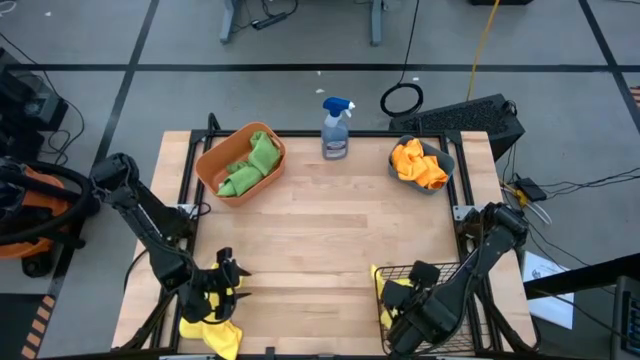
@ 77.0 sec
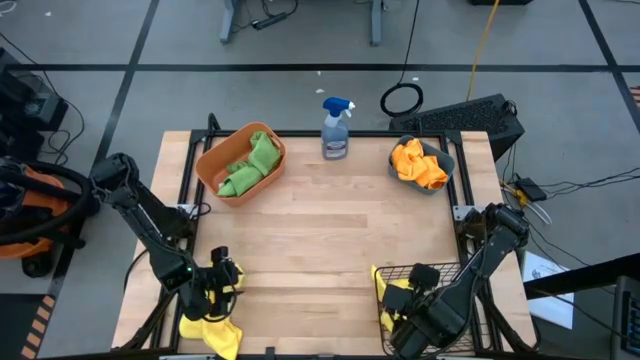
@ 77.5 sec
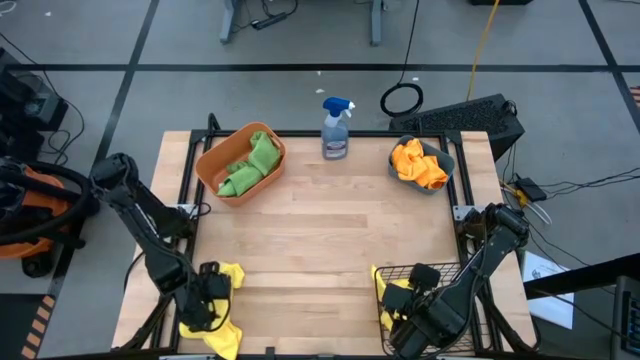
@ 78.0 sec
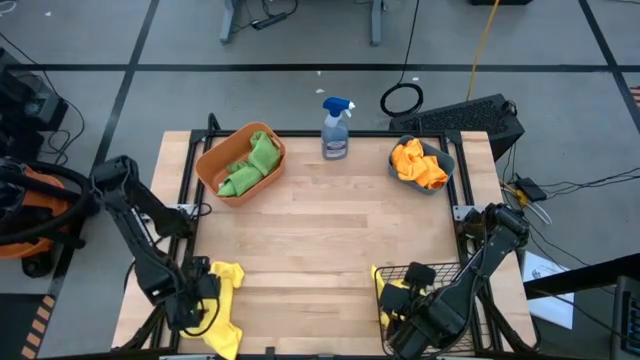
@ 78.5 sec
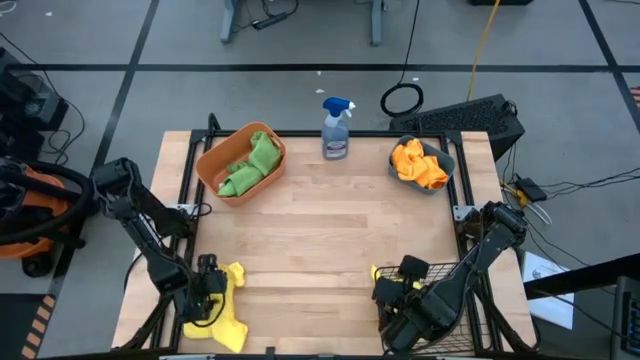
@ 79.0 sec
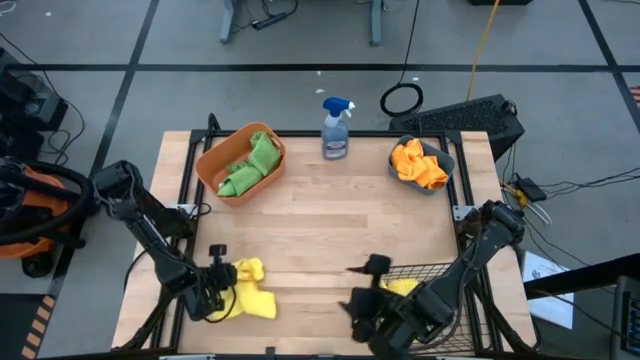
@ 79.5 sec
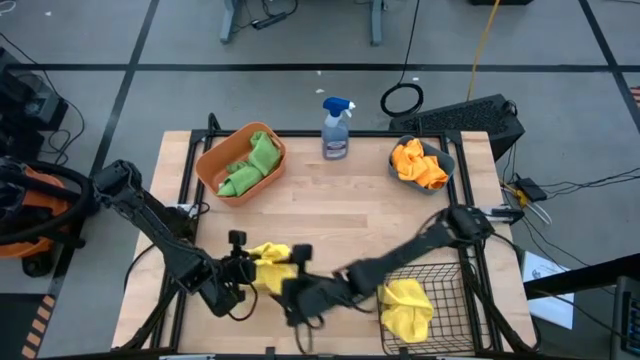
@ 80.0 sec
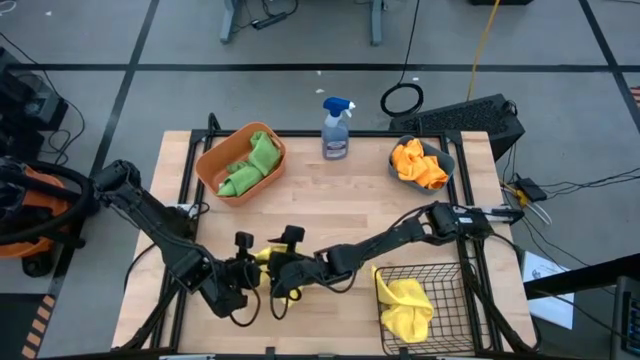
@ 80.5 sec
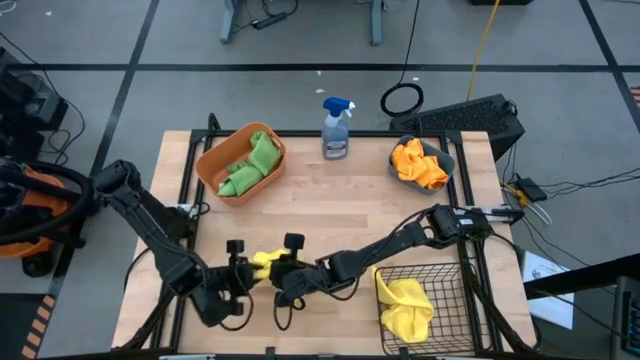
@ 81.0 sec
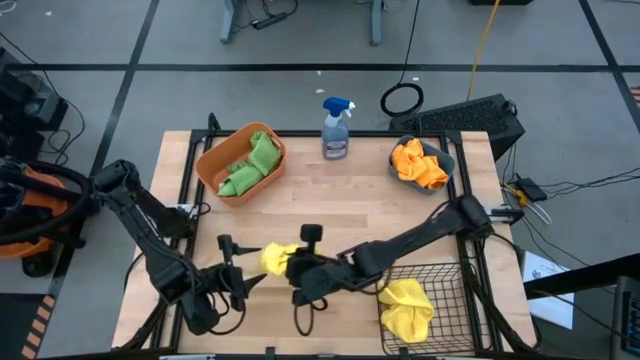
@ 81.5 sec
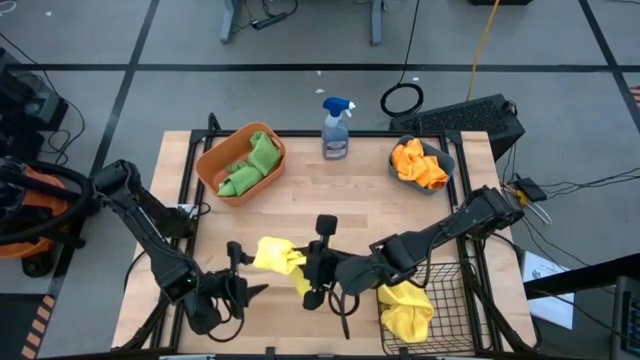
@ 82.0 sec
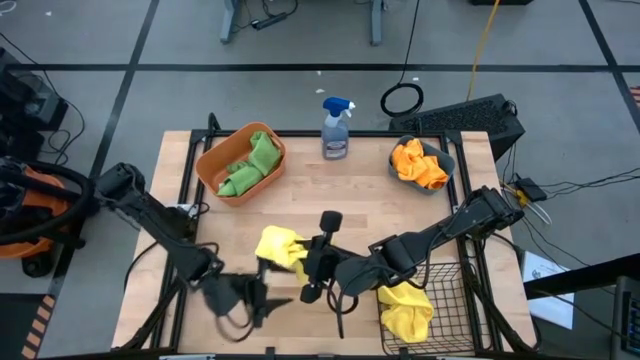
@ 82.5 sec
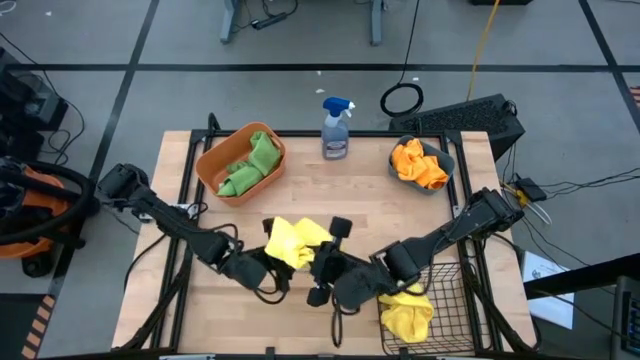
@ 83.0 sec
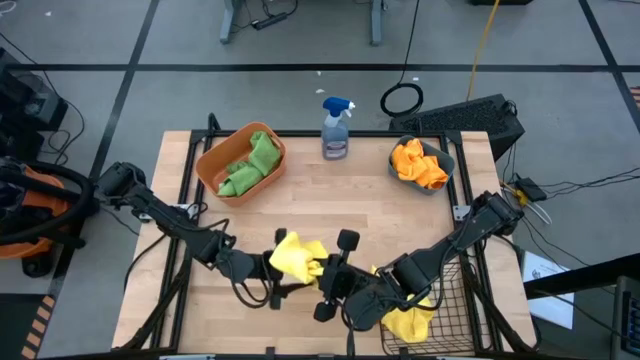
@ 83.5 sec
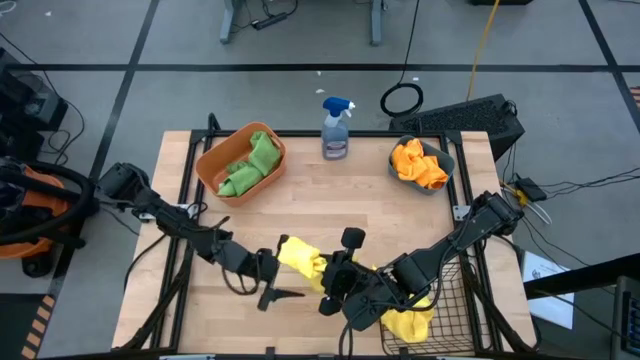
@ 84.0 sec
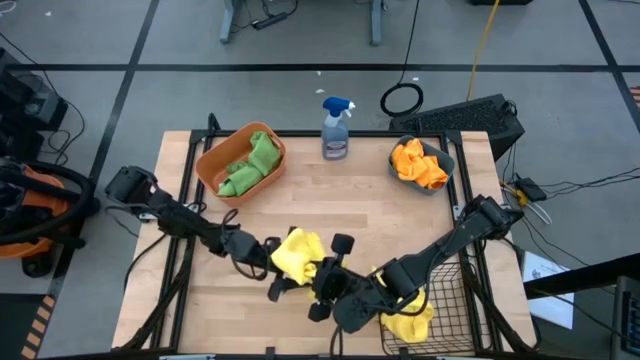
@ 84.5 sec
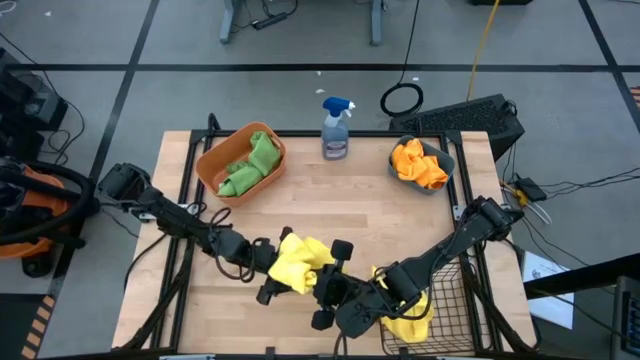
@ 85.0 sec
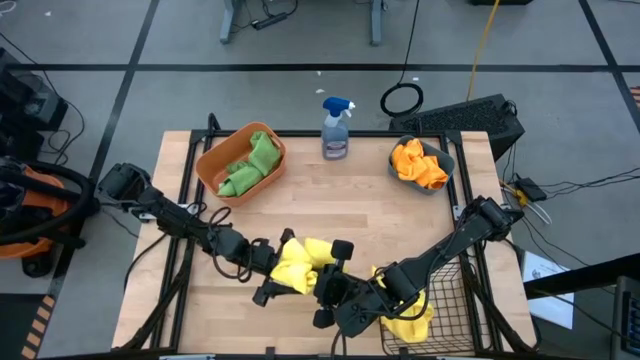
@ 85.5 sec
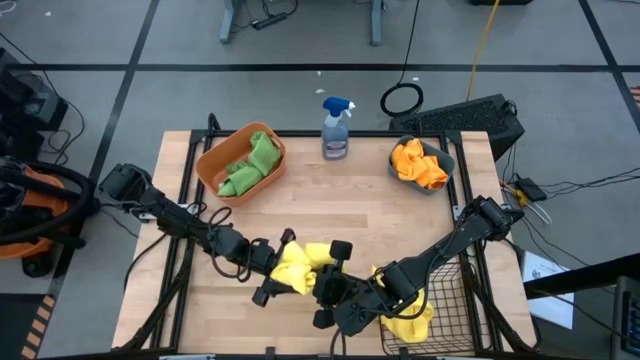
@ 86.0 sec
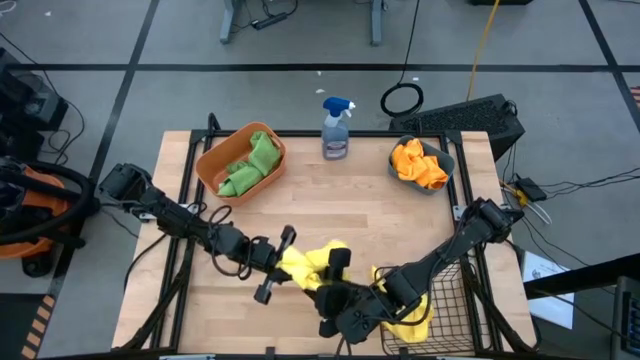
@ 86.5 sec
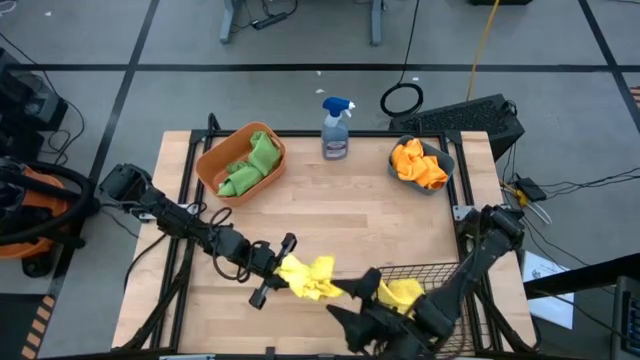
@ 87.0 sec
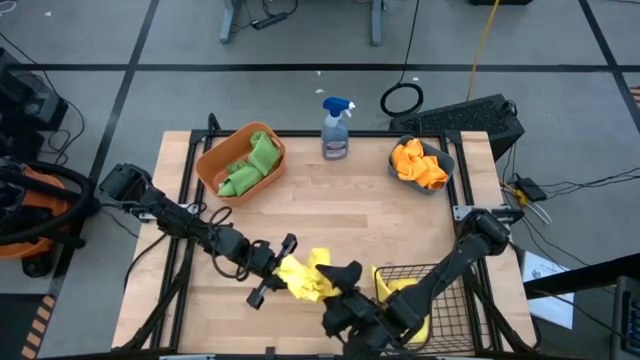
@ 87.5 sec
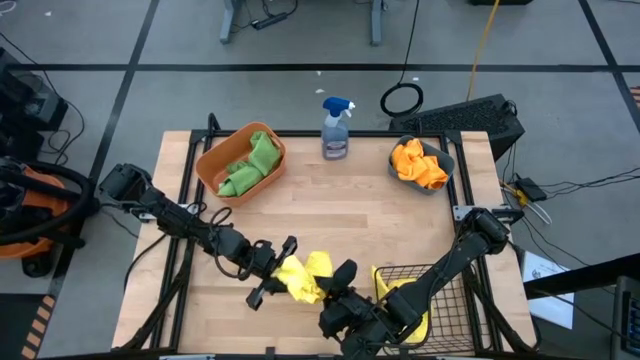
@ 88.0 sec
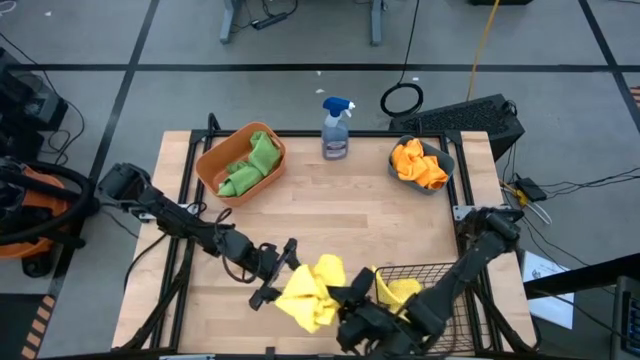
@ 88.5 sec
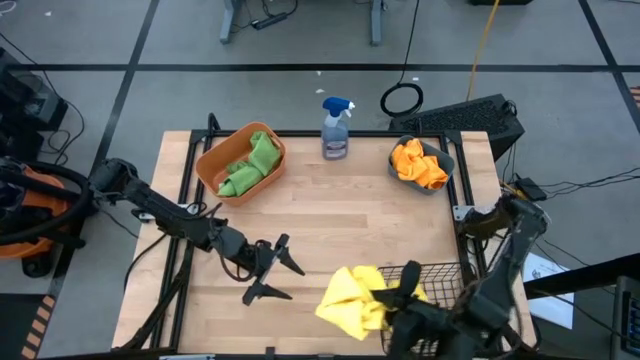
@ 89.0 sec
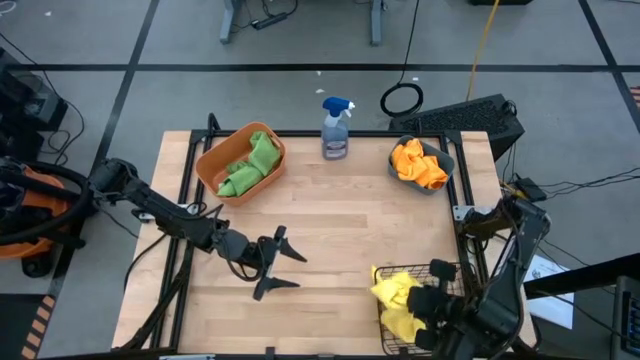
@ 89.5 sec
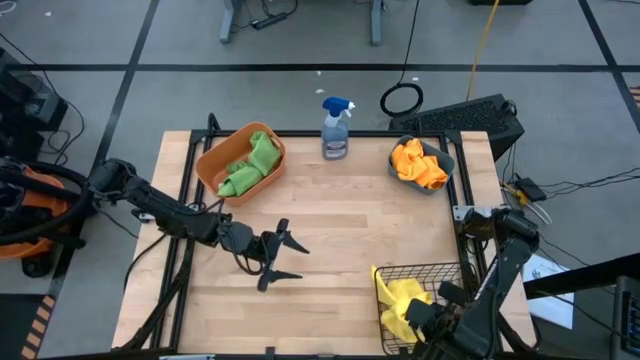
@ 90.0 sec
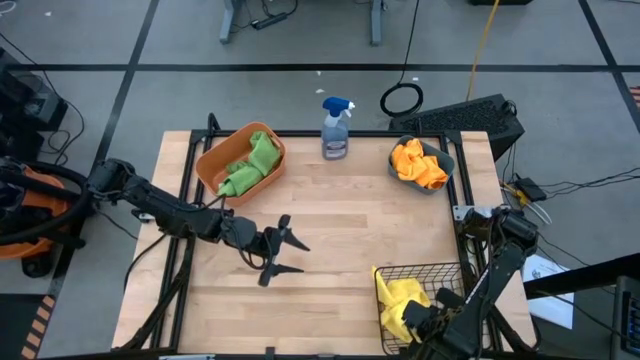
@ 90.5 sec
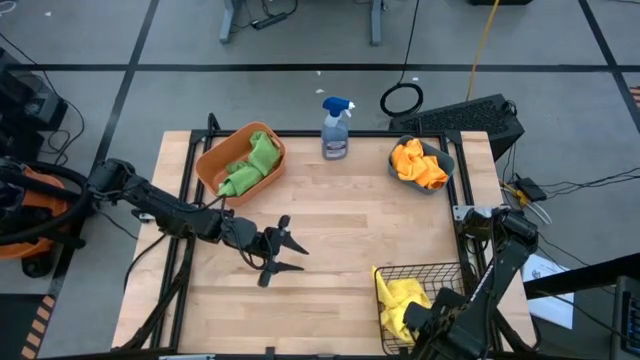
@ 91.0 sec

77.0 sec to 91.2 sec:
Task: Sort microfiber towel by color & place in baskets
Put the yellow microfiber towel into the wire basket

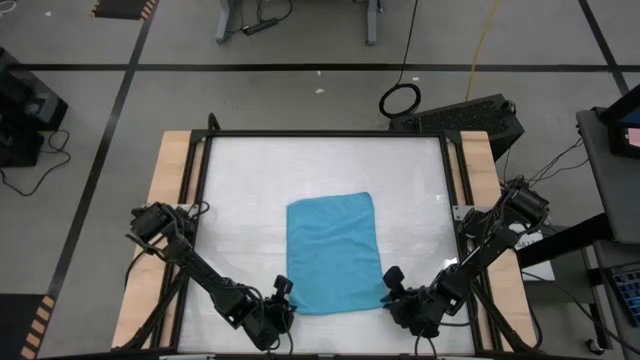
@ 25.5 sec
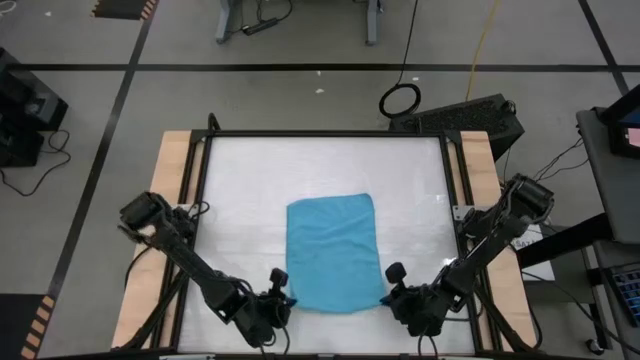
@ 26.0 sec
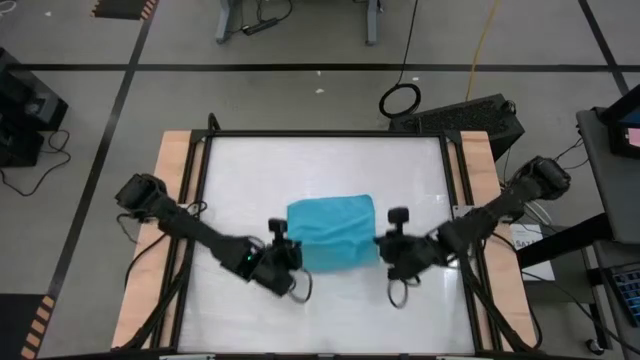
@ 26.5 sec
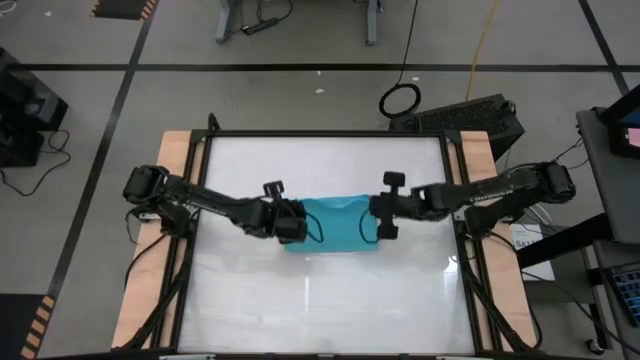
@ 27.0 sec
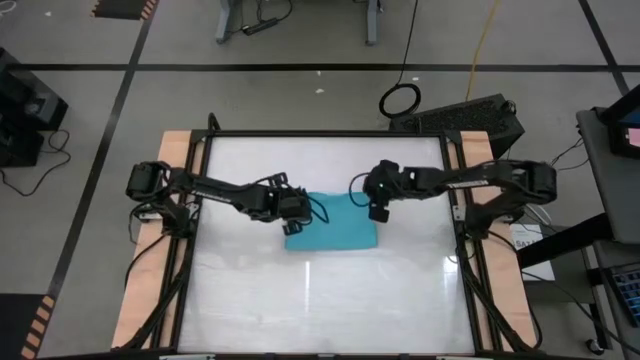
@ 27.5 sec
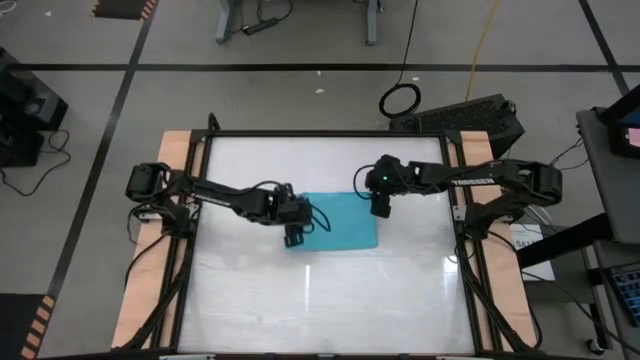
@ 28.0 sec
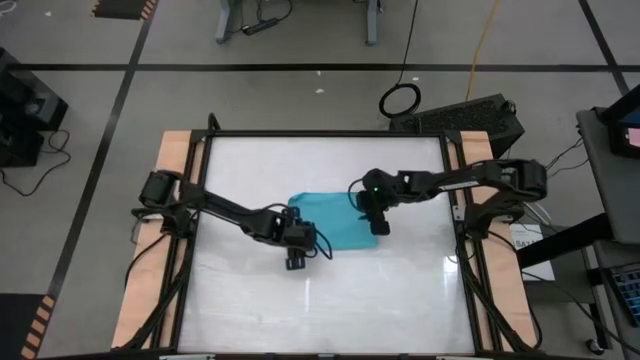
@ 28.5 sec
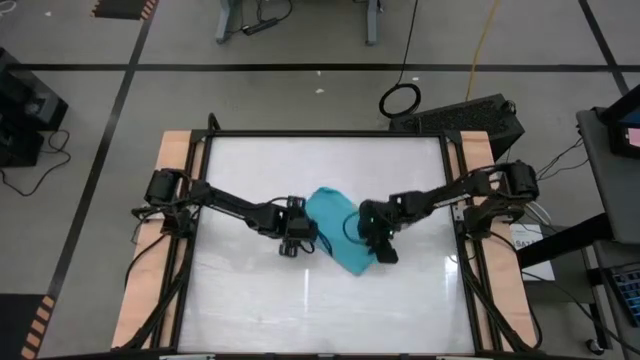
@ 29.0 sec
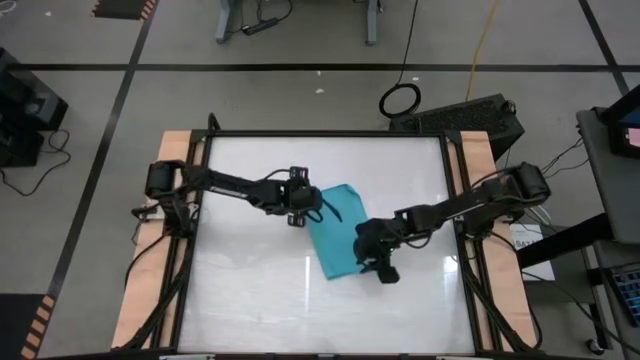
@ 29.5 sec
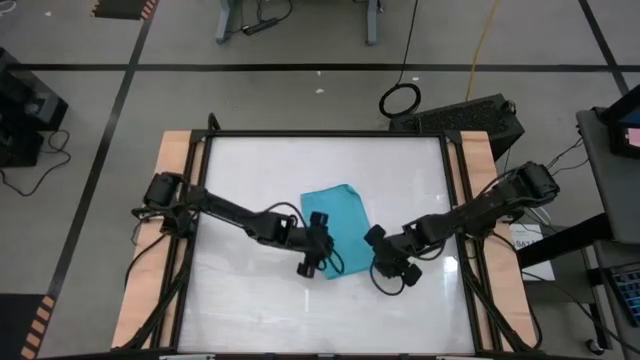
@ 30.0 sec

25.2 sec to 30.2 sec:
Task: Roll towel
Fold the blue microfiber towel
